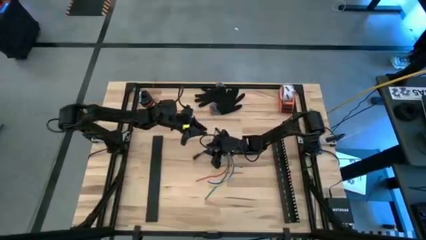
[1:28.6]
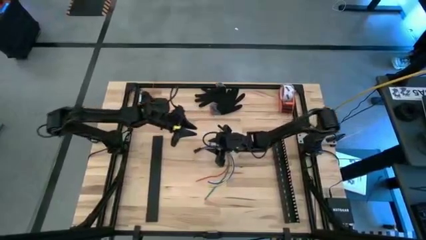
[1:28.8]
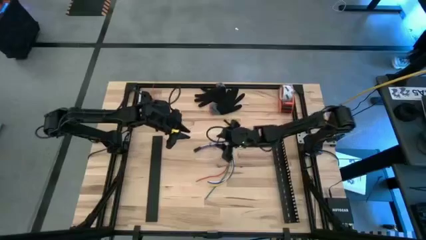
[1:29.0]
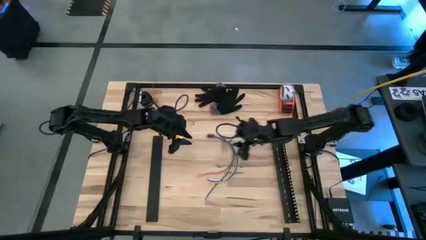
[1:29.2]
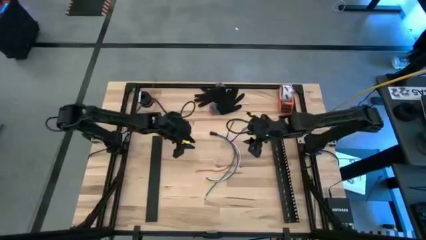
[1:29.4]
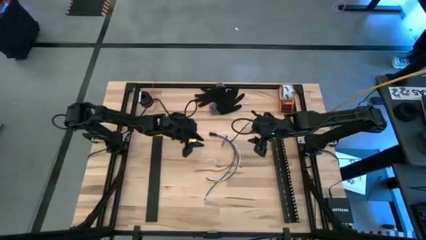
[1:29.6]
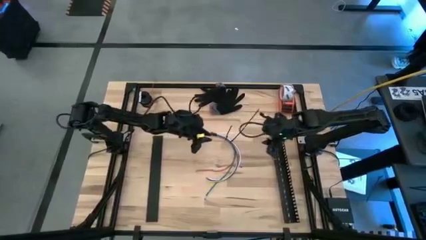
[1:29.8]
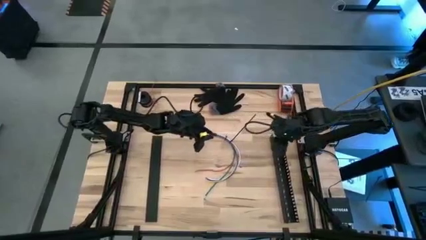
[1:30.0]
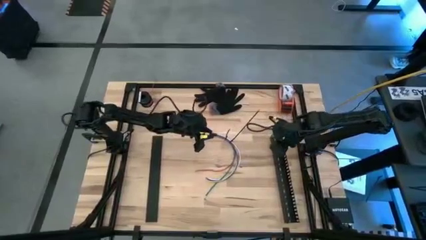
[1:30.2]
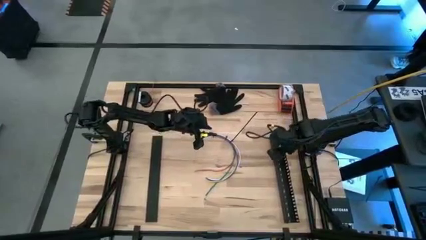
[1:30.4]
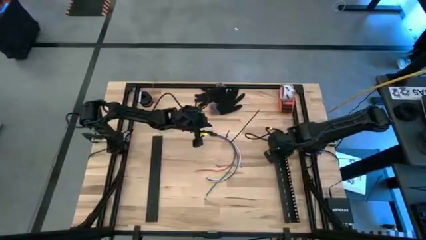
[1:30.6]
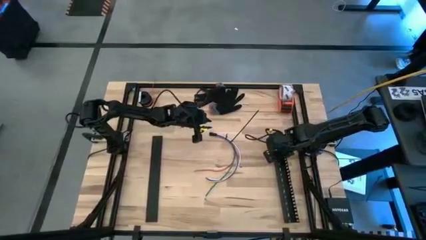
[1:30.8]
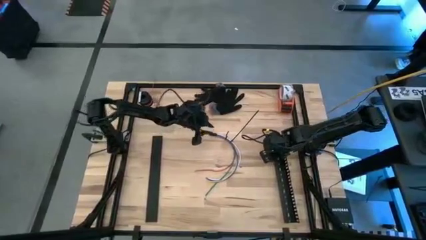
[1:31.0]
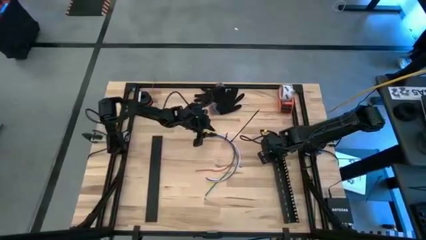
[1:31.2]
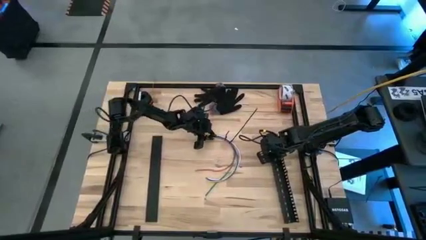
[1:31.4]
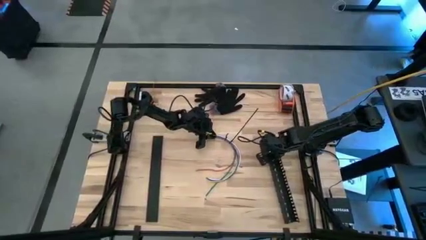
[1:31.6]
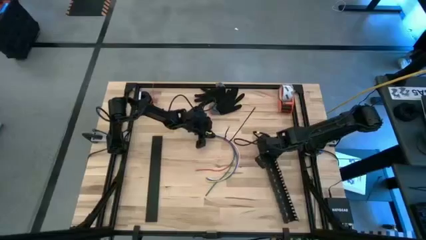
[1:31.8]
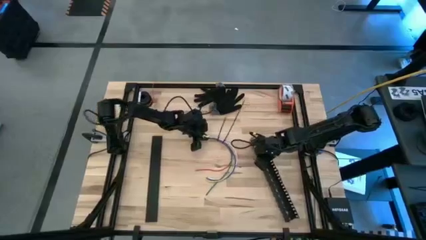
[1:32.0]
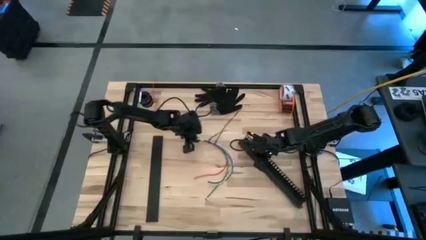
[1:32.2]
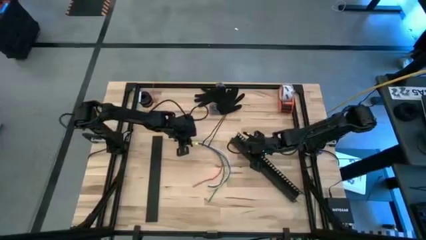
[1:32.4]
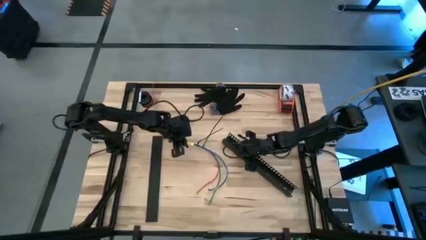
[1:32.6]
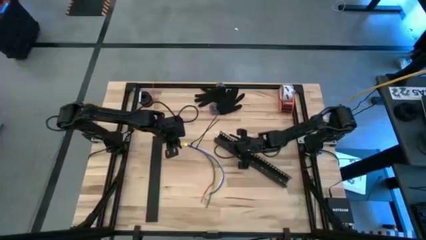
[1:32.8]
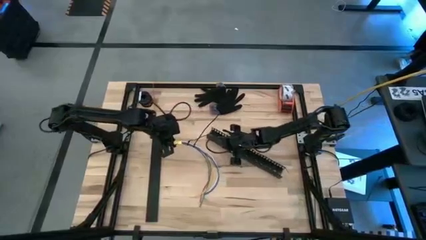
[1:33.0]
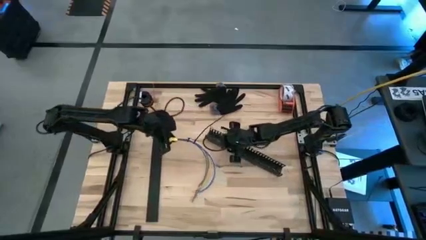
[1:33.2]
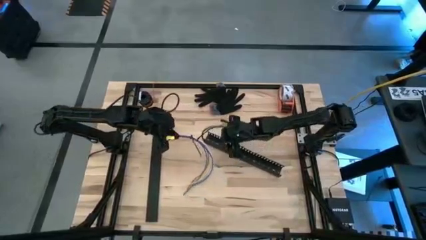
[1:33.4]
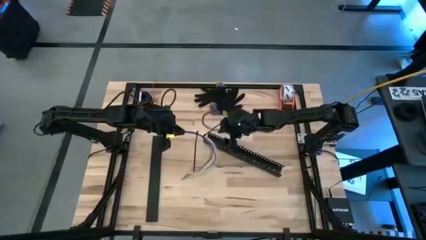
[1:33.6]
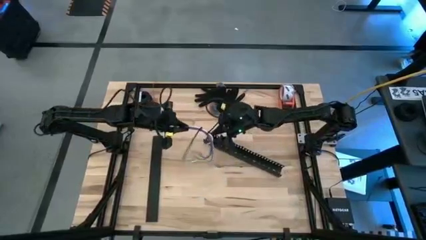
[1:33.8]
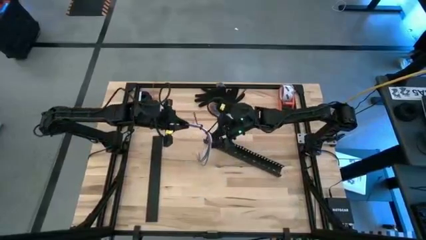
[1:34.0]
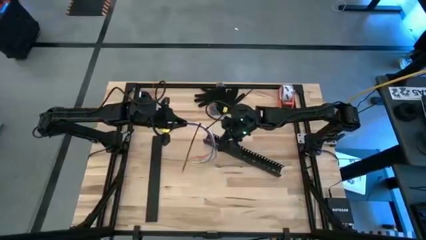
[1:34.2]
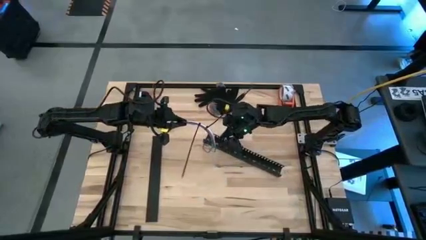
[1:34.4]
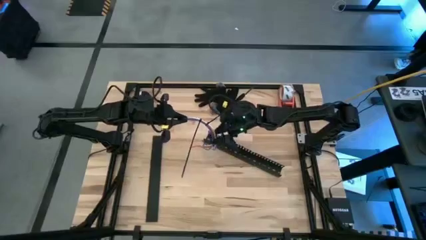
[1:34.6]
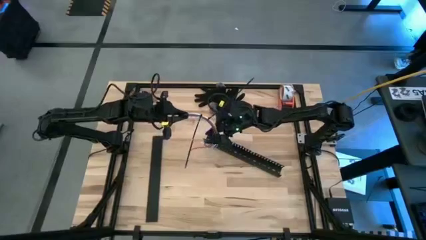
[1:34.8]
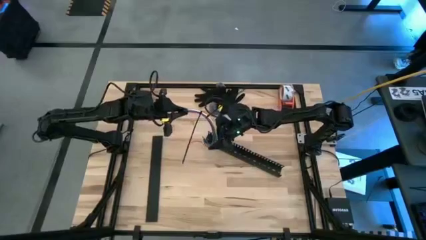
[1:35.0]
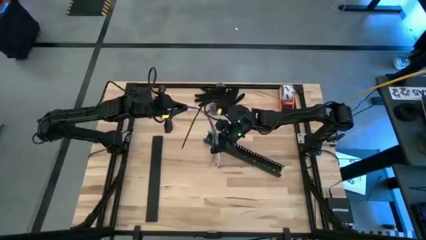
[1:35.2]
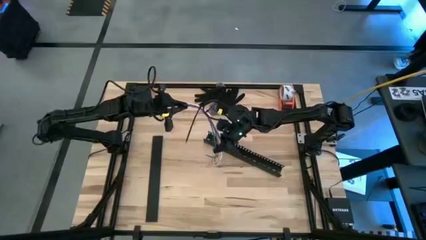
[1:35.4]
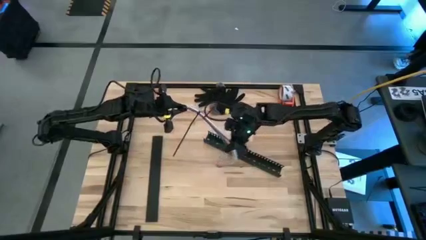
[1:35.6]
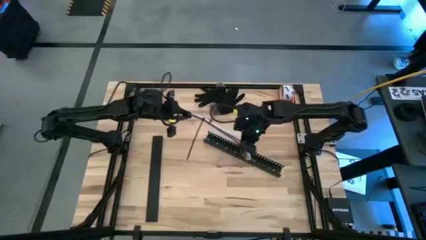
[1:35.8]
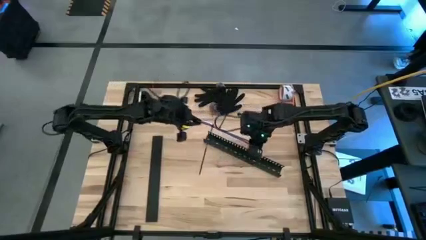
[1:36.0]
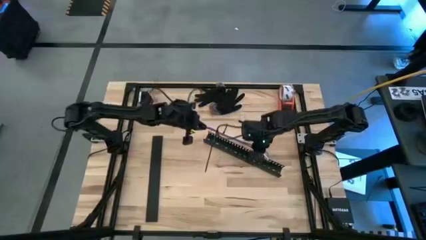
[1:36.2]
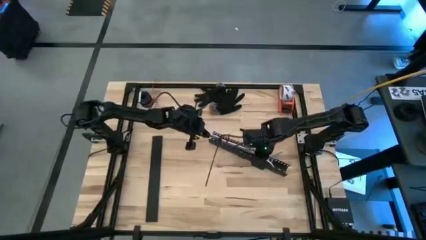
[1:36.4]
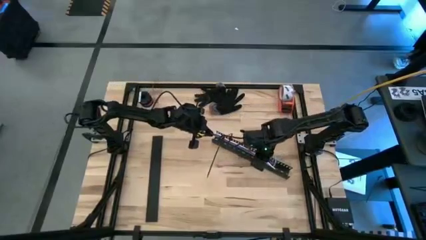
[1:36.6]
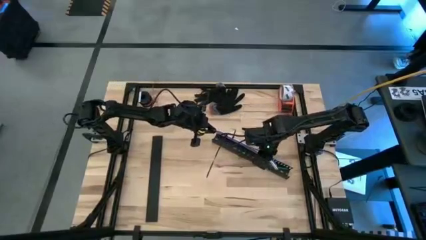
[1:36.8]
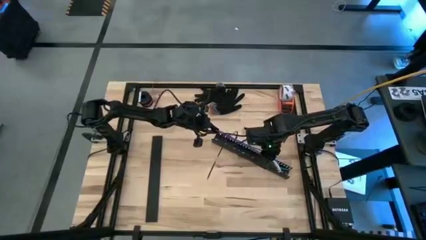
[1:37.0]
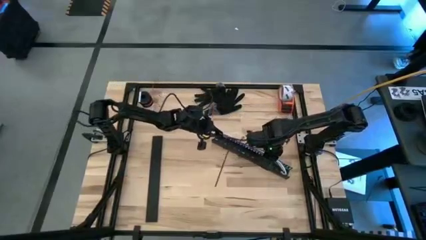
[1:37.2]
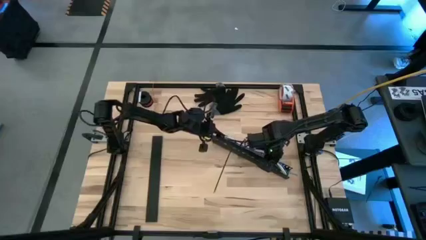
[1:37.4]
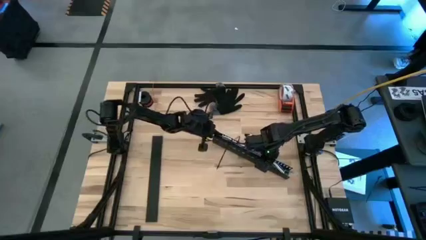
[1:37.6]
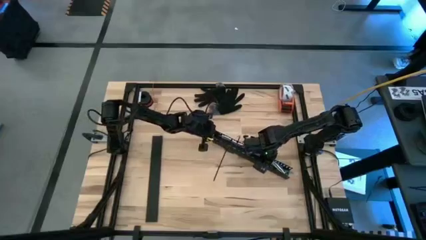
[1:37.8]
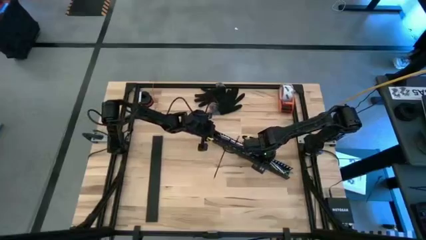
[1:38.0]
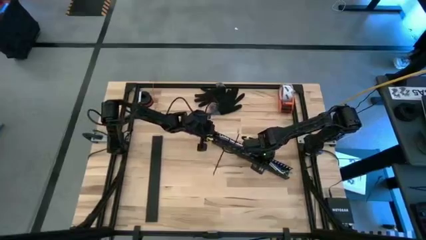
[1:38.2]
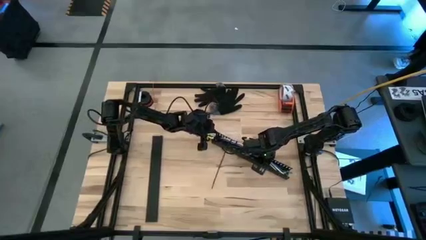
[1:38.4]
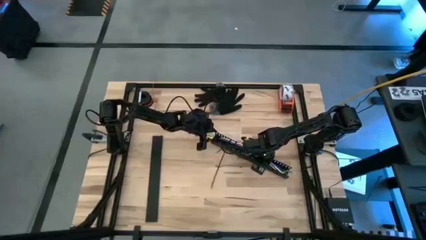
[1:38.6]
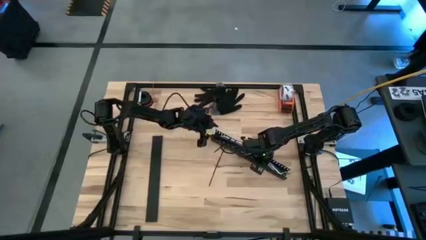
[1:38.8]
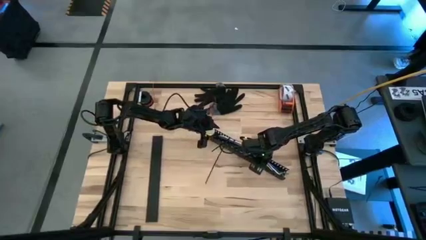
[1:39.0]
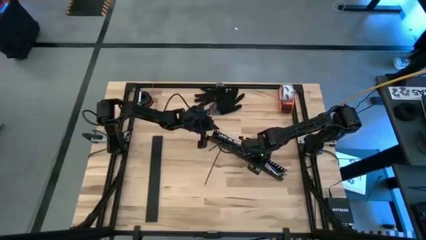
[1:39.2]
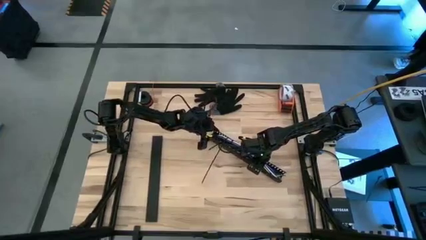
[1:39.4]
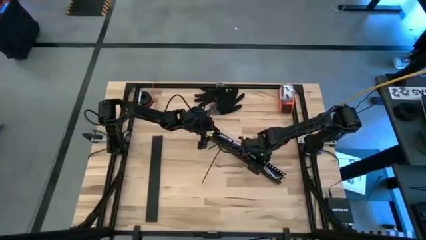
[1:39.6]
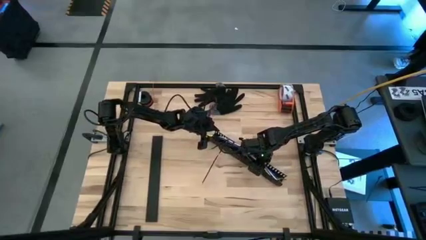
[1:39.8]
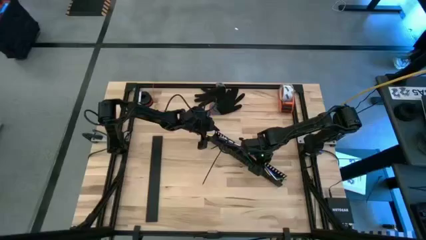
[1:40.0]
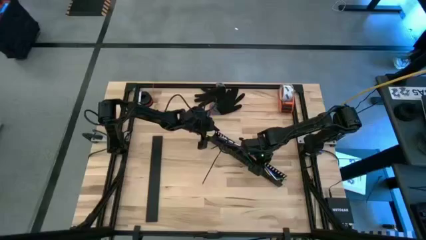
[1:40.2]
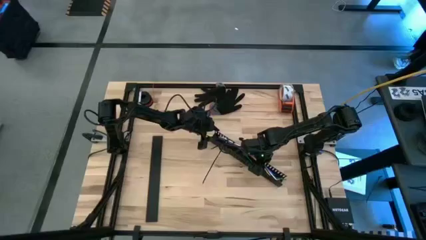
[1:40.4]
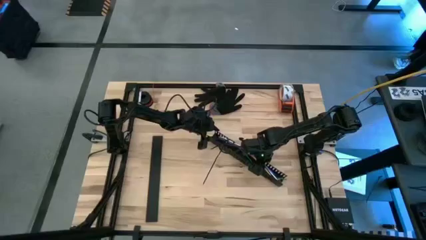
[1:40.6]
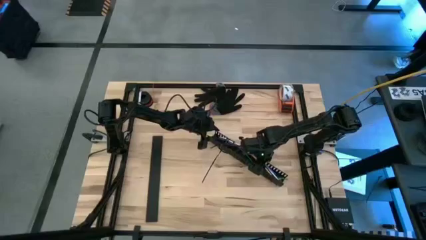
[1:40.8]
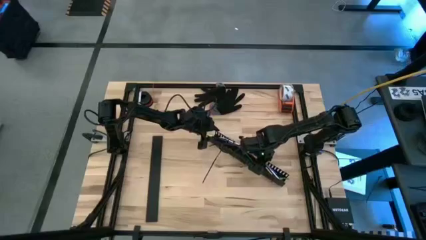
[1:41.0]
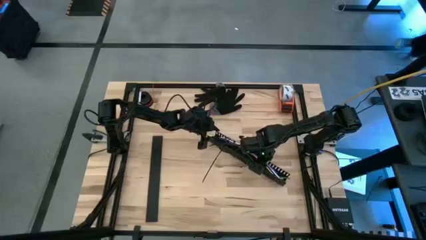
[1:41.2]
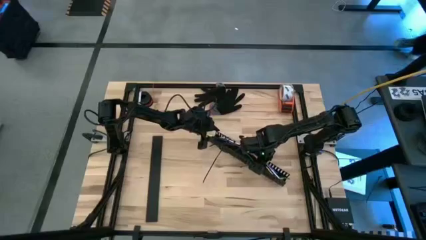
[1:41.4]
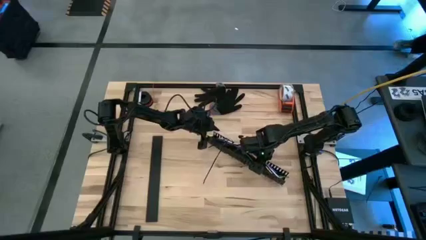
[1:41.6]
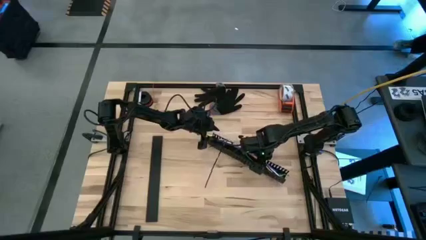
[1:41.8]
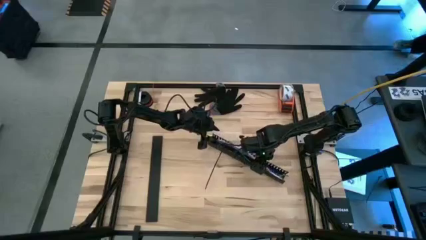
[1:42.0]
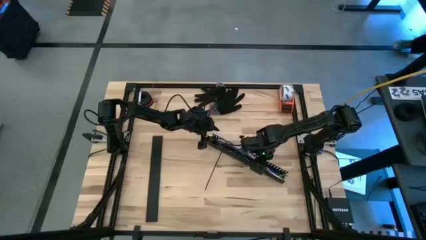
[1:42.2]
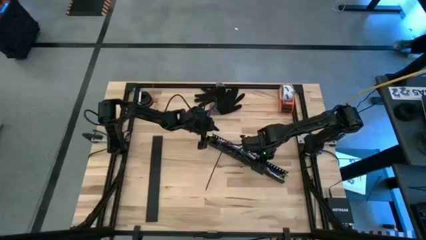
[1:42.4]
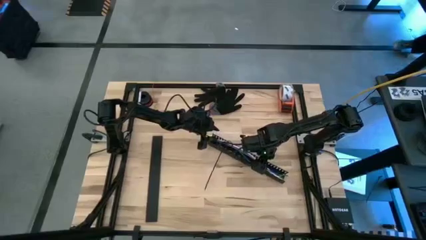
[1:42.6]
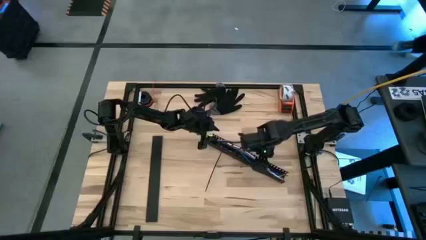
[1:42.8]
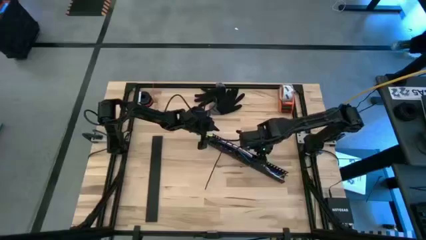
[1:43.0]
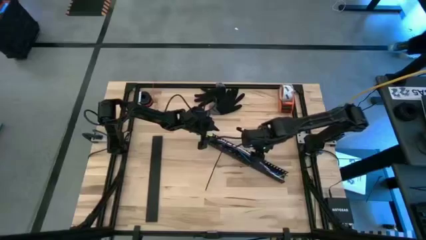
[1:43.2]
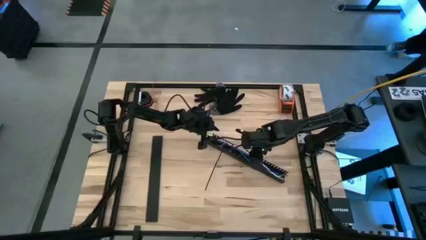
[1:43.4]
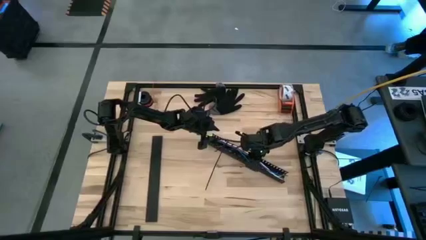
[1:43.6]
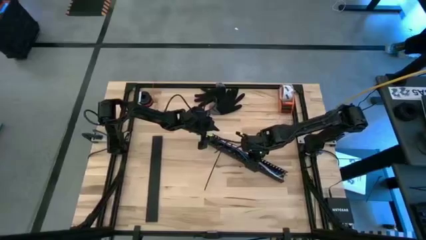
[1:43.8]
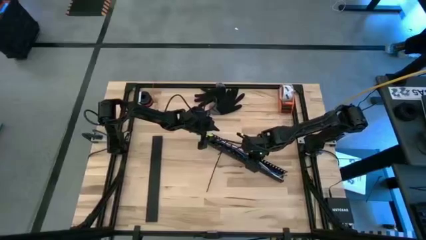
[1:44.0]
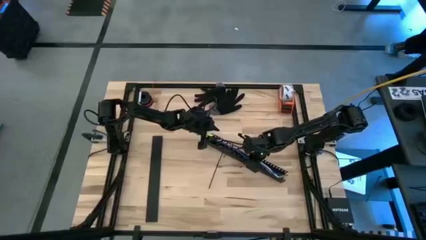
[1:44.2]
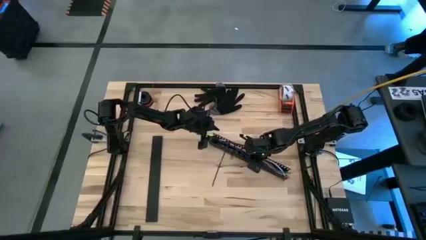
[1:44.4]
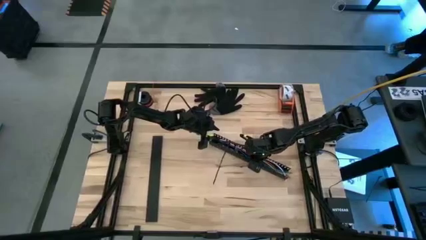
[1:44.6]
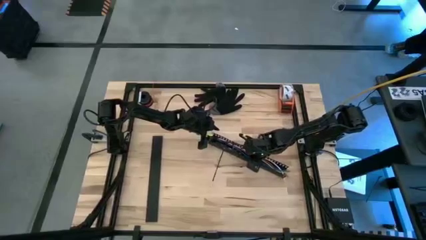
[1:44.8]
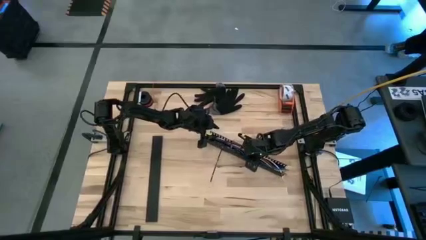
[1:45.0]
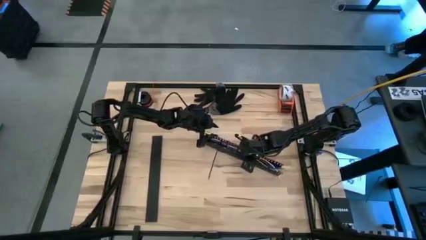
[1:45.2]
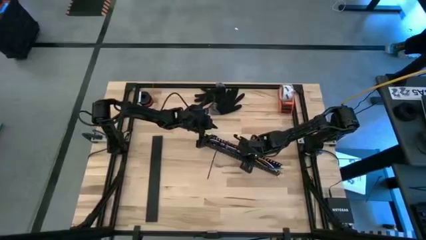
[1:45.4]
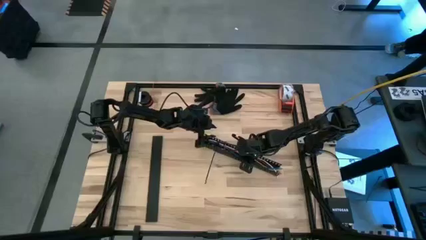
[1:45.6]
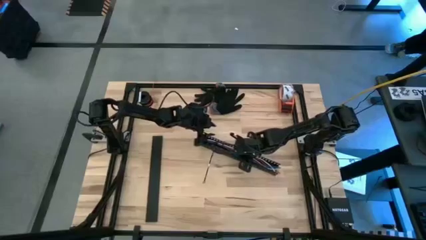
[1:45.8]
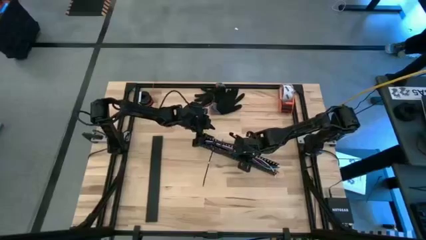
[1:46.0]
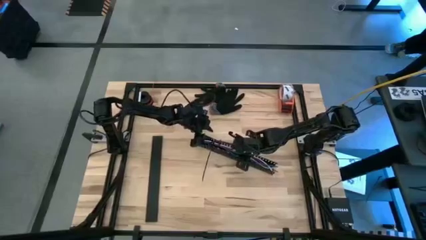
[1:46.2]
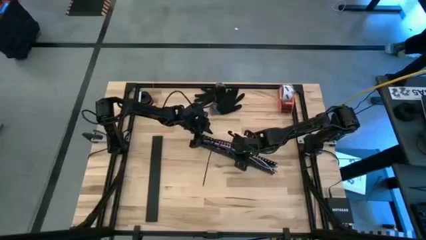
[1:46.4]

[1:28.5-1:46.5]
Task: Ziptie cables
Put the cable wires into the cable duct
